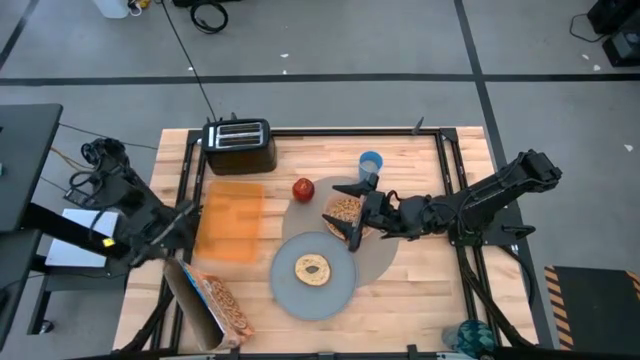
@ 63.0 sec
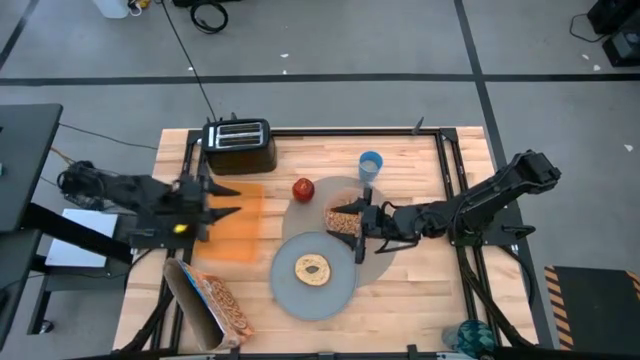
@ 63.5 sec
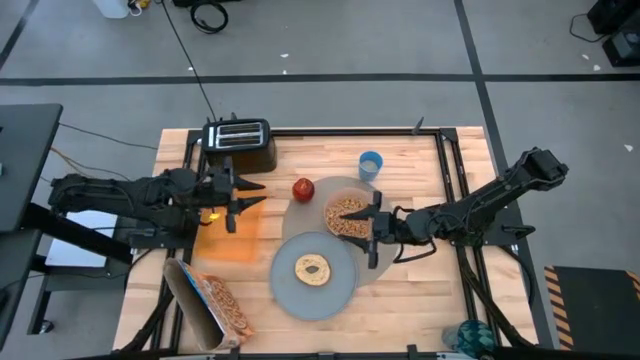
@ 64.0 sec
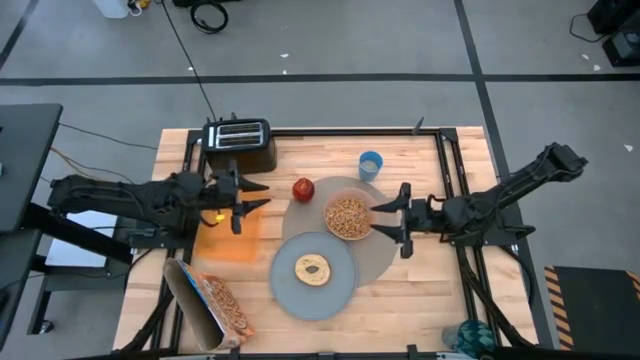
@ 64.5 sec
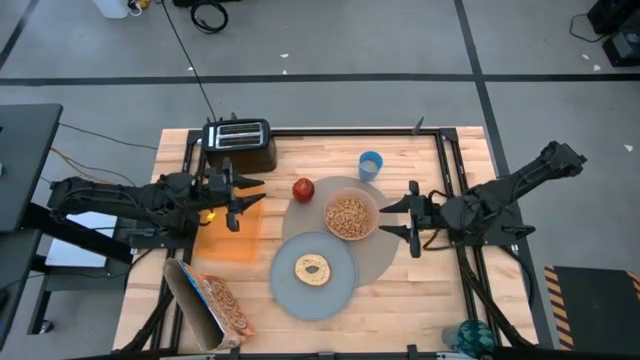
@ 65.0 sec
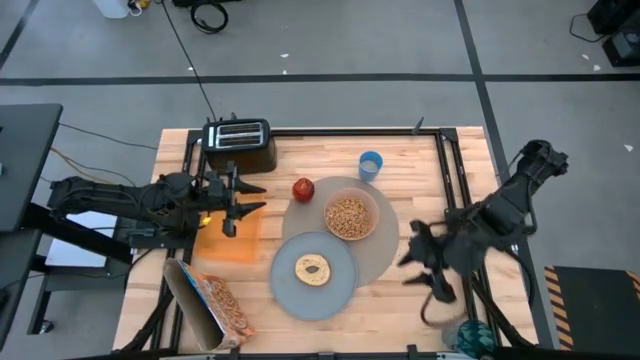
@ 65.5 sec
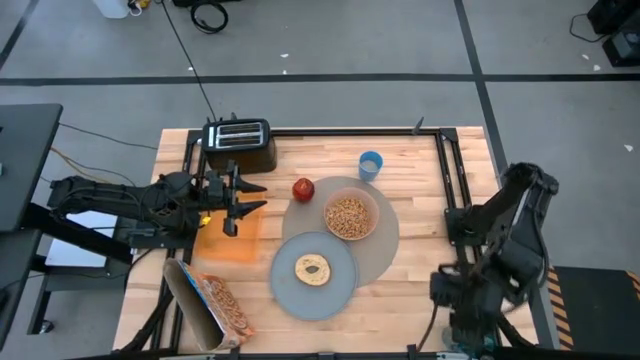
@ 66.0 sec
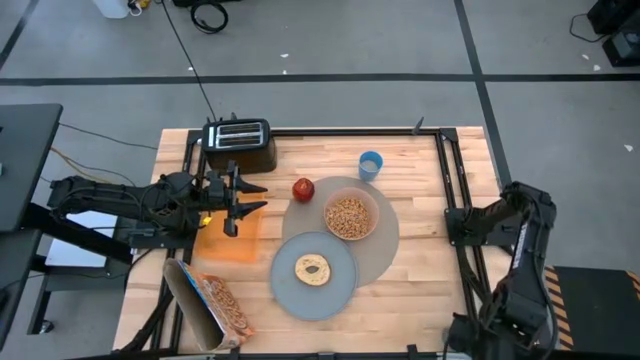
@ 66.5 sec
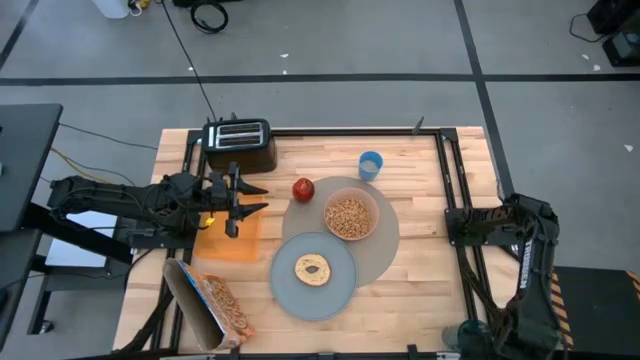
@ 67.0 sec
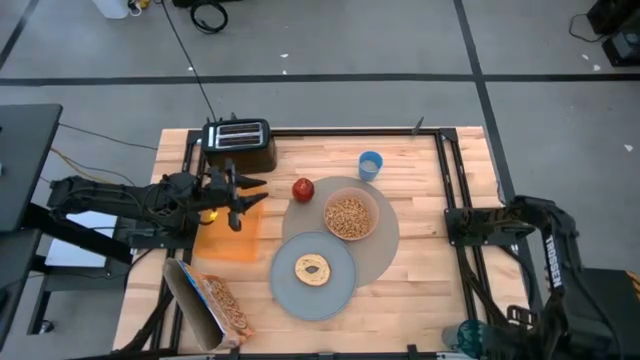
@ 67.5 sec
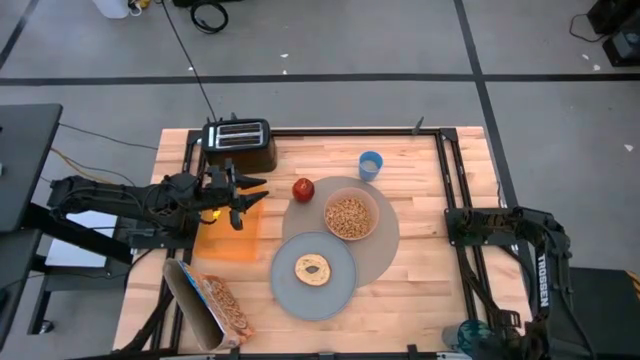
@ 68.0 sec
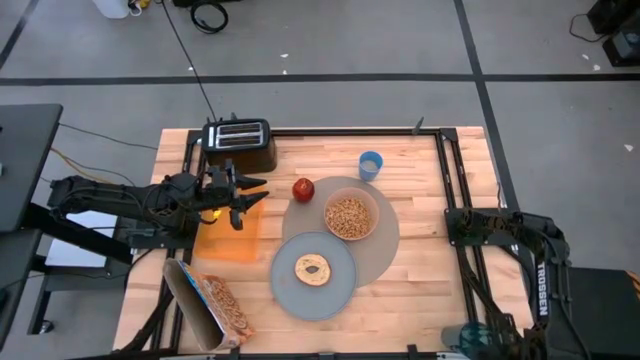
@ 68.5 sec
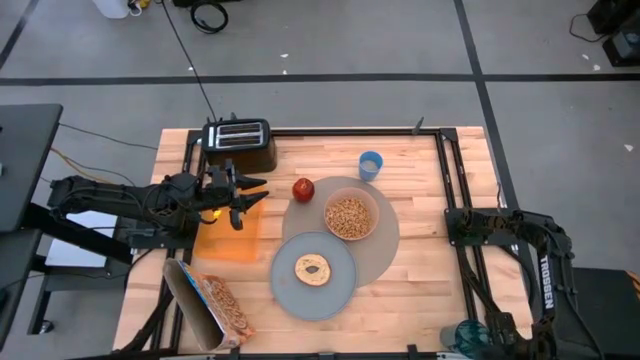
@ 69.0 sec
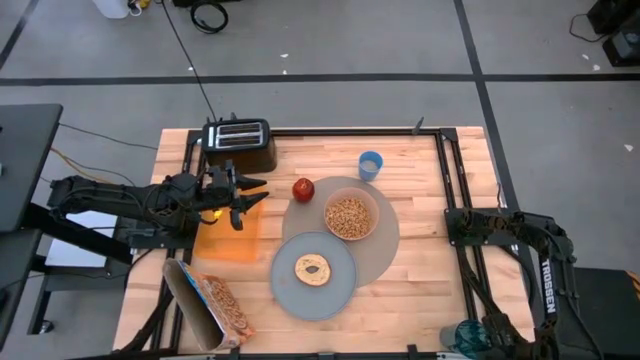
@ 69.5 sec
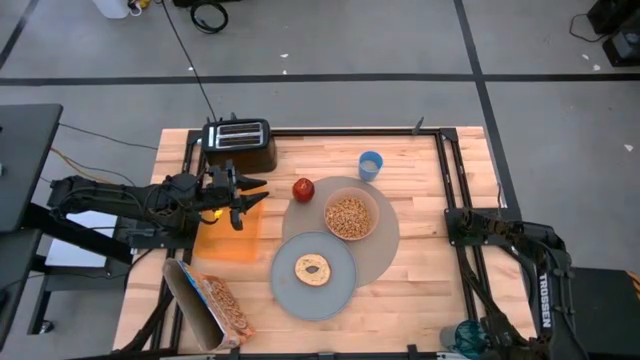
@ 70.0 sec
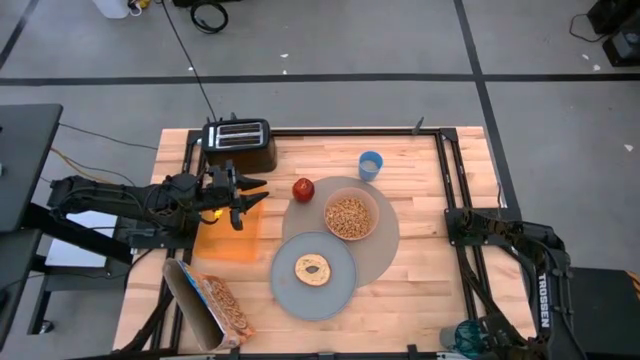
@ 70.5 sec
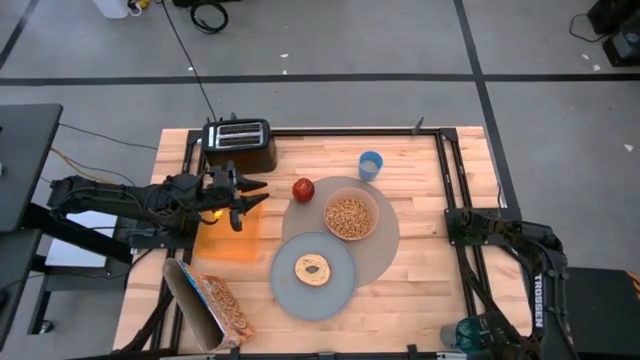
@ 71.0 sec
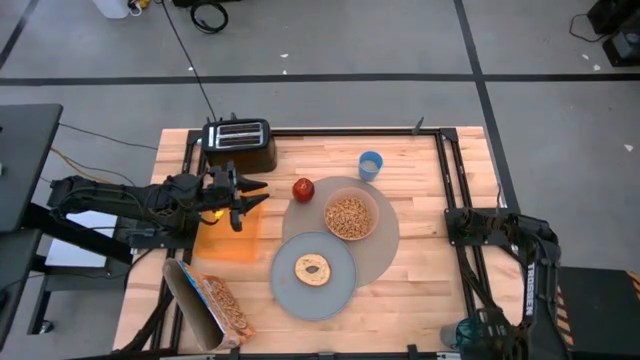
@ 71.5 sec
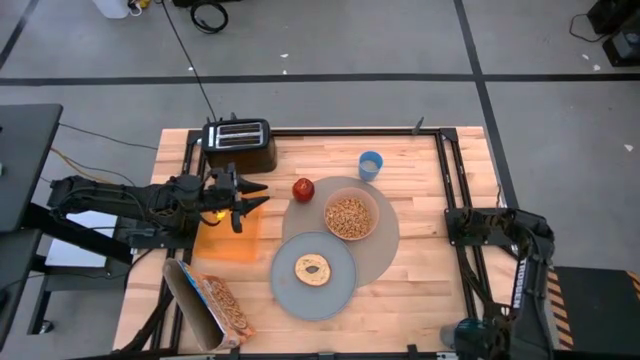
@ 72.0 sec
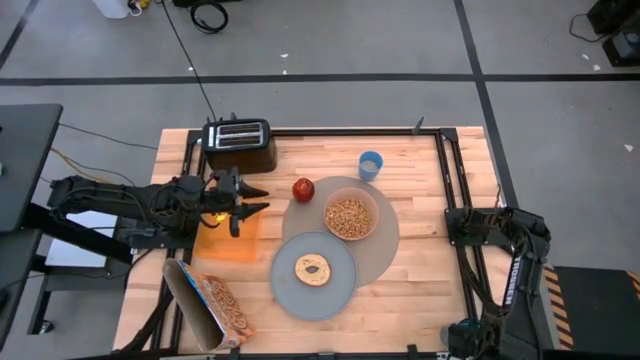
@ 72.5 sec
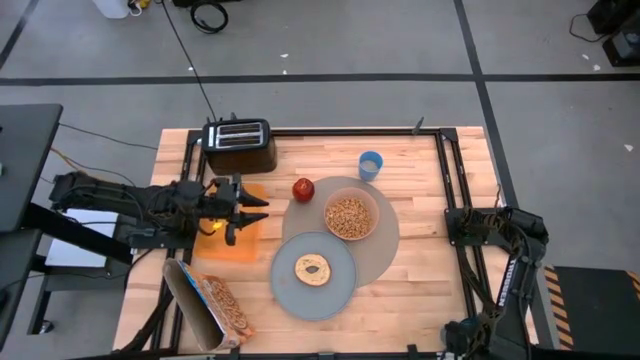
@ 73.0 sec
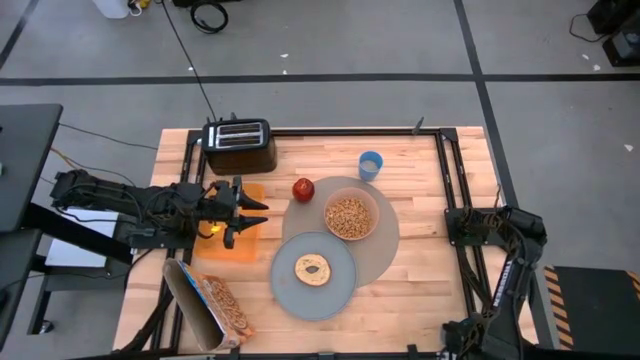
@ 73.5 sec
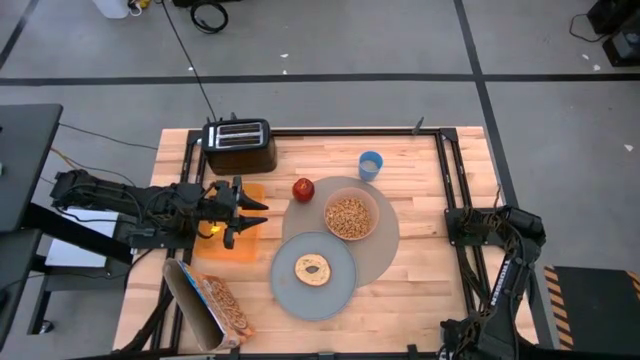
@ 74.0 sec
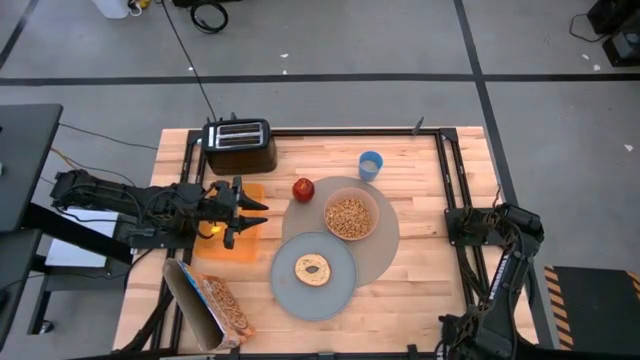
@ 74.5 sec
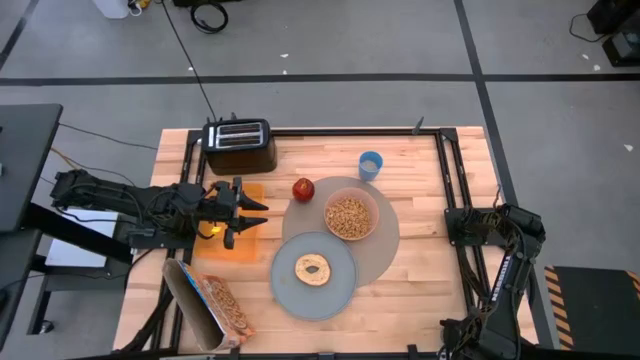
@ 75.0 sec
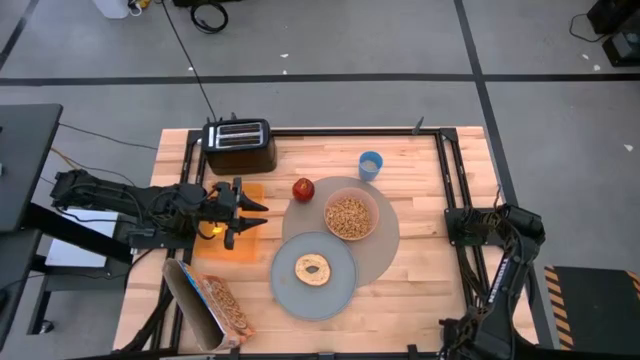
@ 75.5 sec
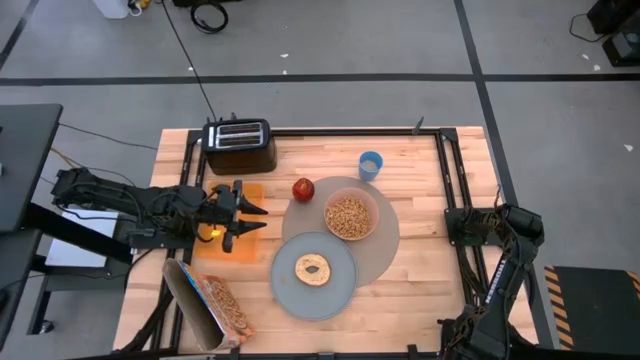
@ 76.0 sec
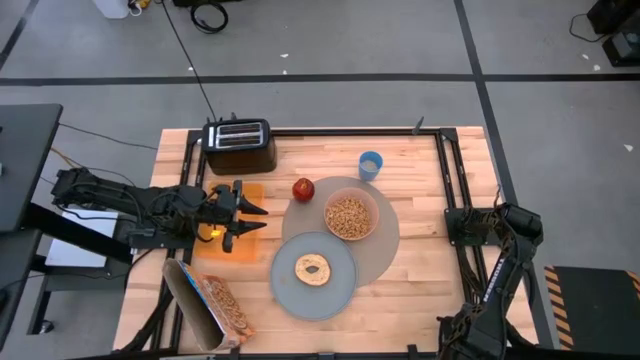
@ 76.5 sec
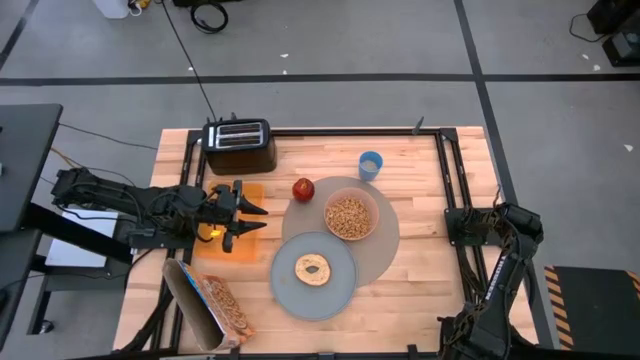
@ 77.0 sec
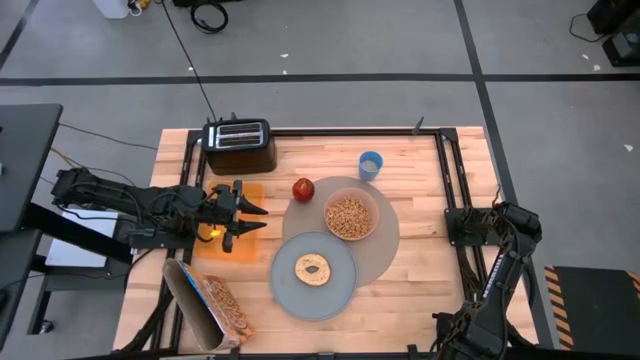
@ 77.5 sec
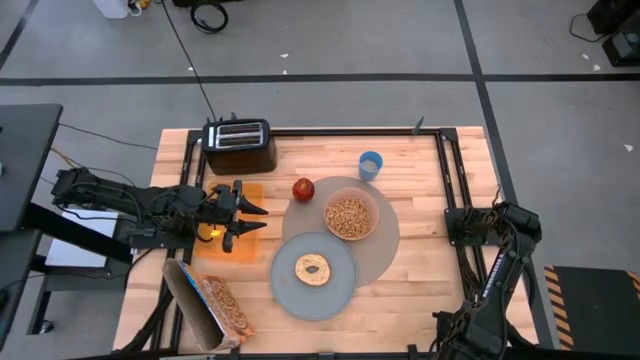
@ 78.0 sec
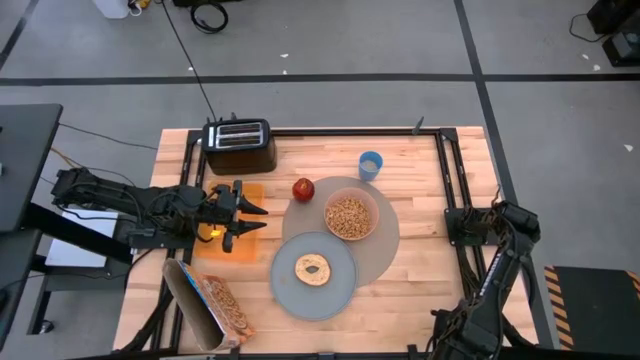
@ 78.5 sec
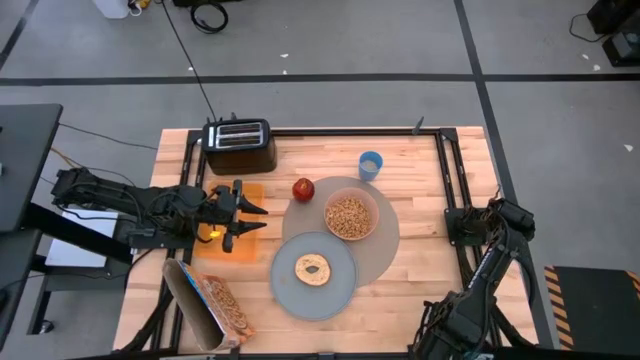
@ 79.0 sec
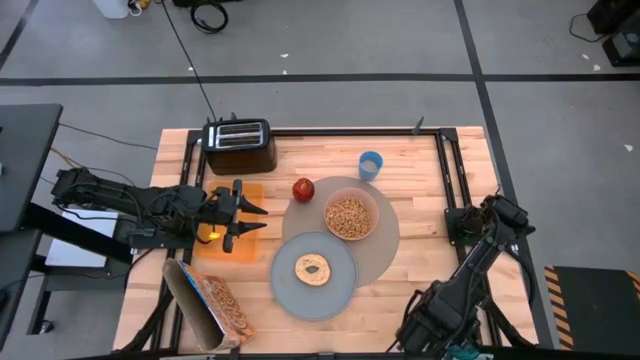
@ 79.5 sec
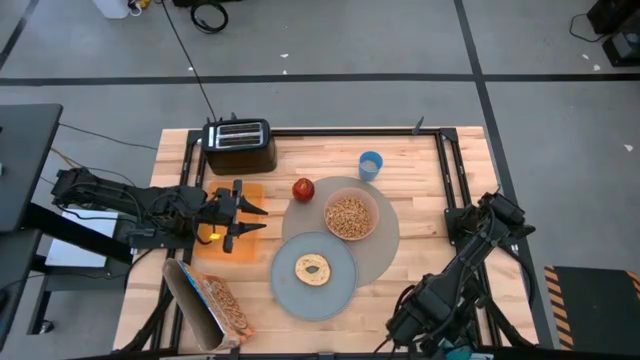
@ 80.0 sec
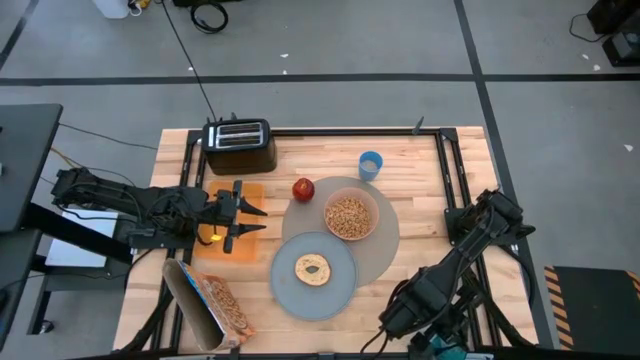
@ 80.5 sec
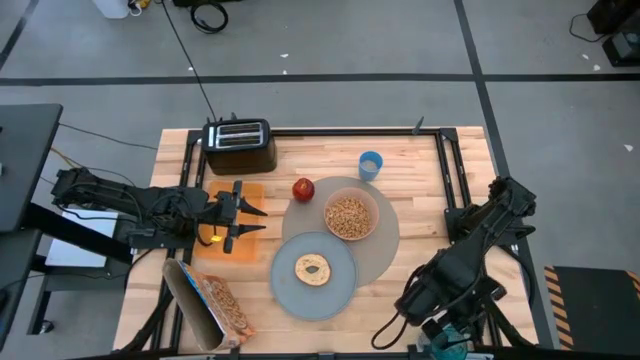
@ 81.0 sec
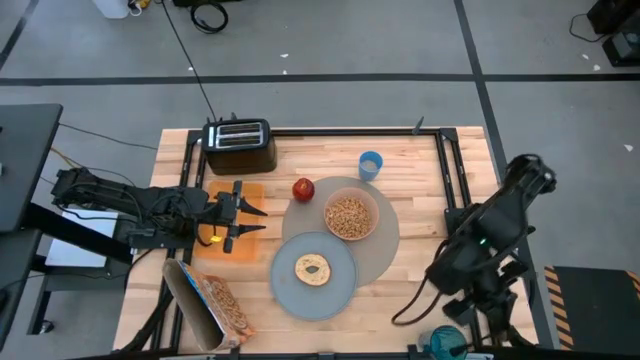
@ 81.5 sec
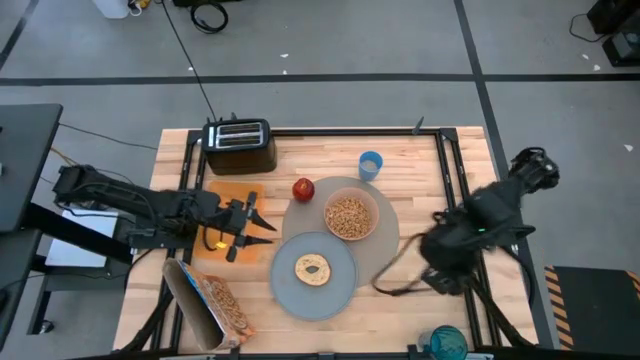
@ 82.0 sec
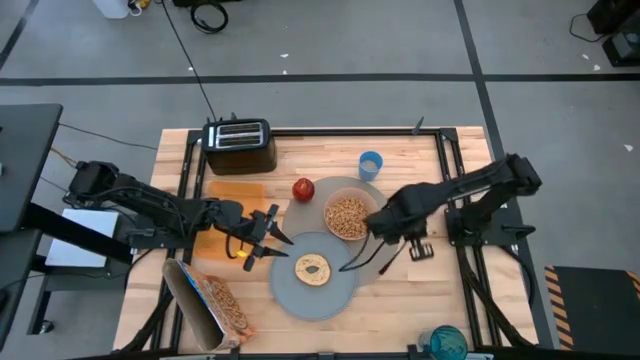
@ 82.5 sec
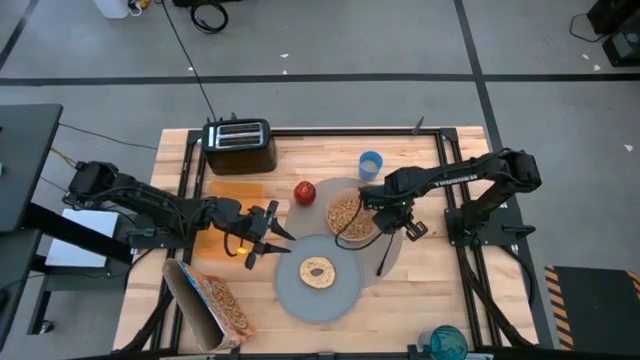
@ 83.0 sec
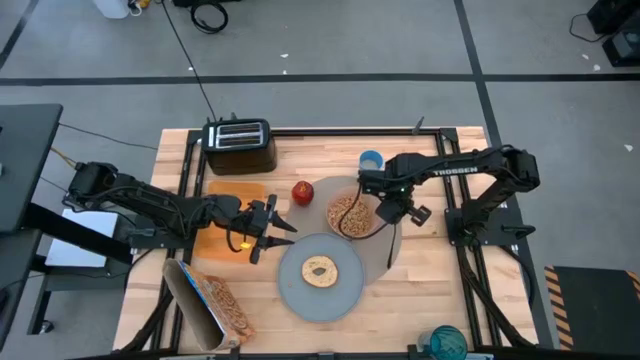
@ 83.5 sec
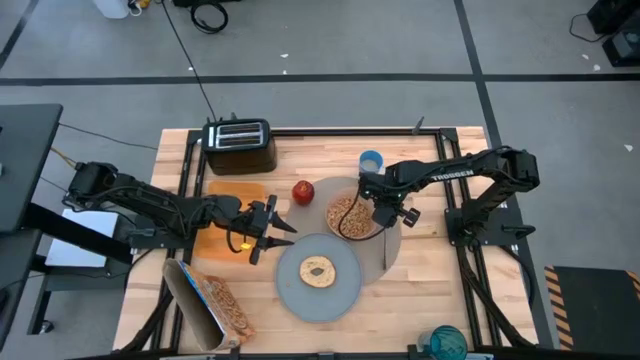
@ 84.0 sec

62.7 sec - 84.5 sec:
Task: Arrange a breakfast setting
Put the spoon from the blue glass on the table mat
